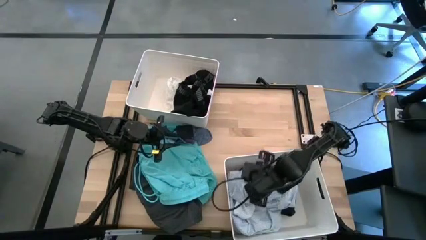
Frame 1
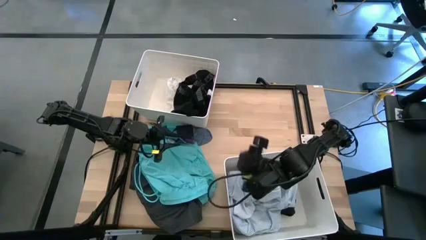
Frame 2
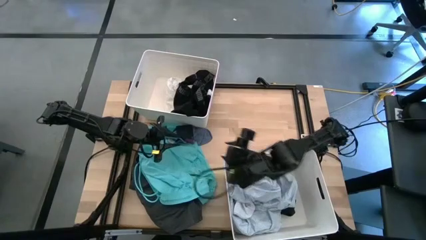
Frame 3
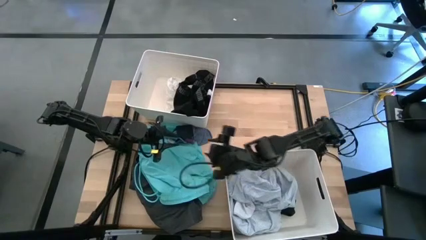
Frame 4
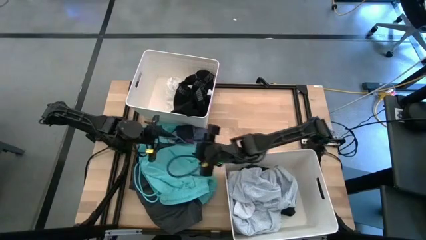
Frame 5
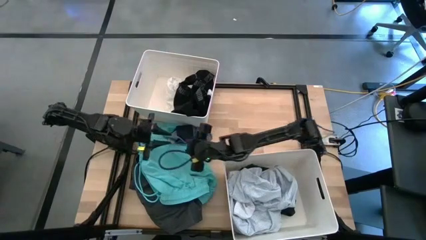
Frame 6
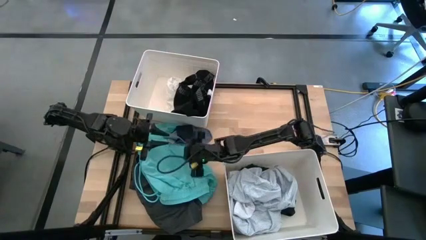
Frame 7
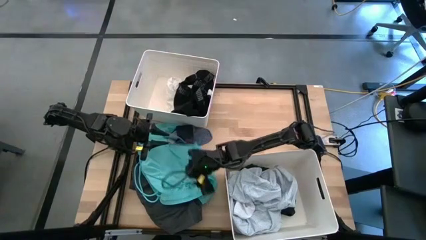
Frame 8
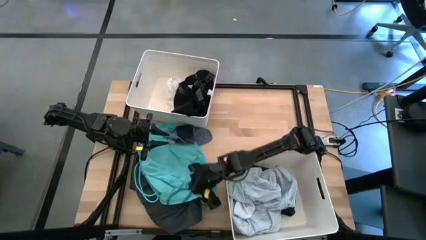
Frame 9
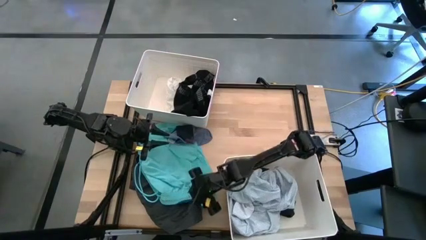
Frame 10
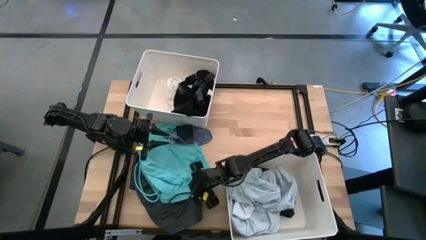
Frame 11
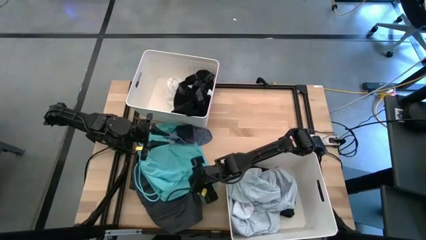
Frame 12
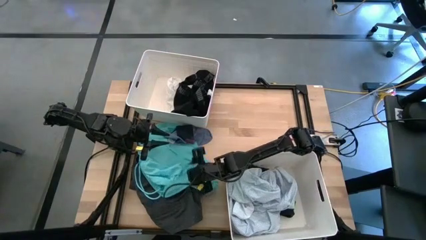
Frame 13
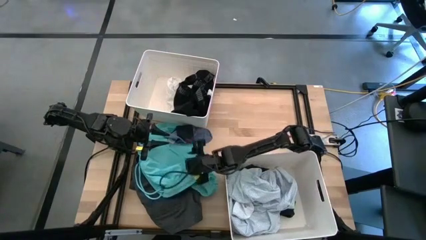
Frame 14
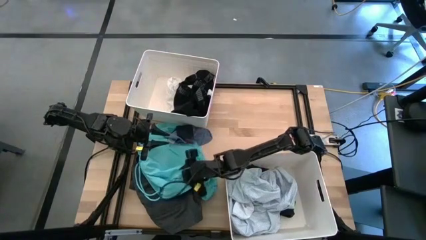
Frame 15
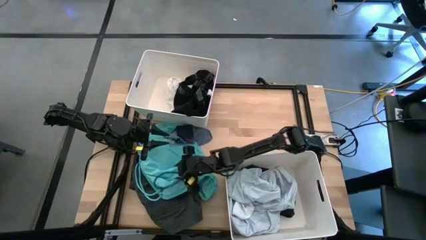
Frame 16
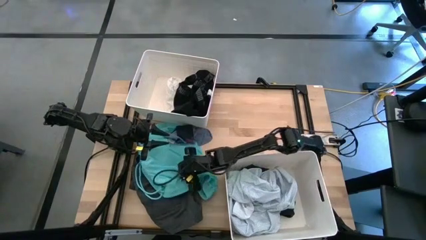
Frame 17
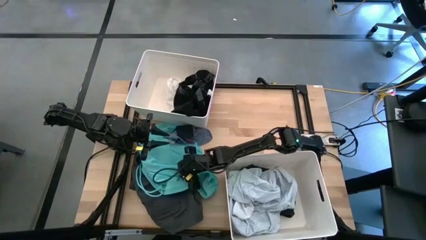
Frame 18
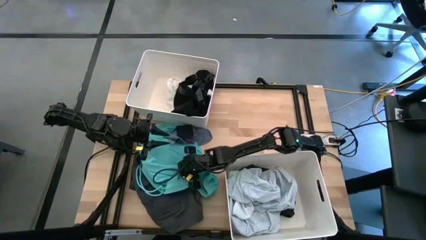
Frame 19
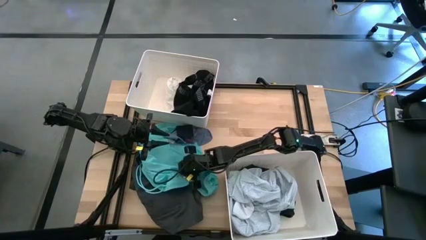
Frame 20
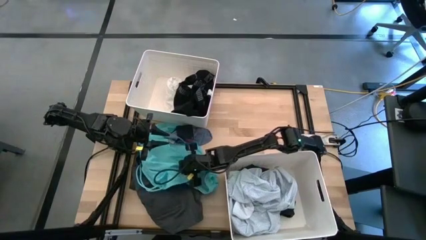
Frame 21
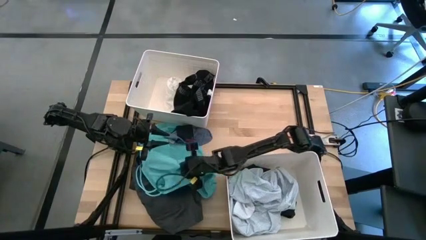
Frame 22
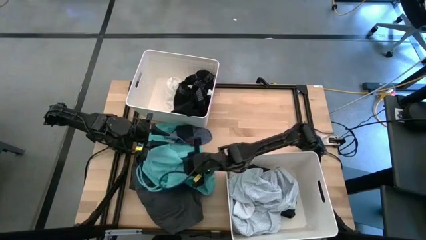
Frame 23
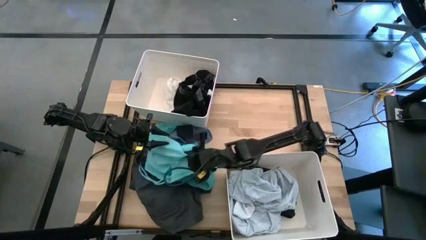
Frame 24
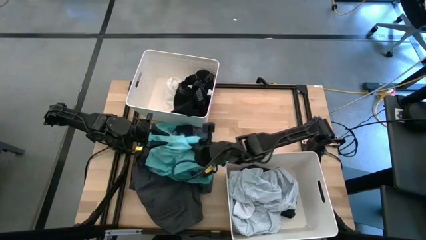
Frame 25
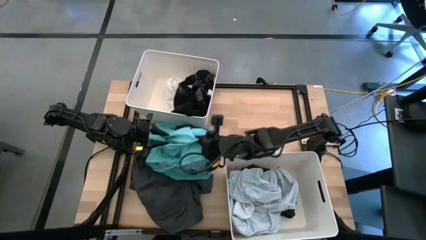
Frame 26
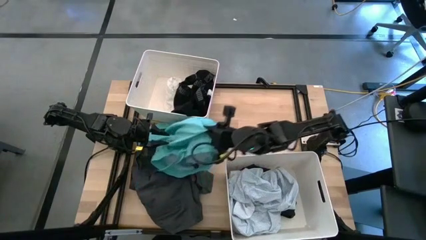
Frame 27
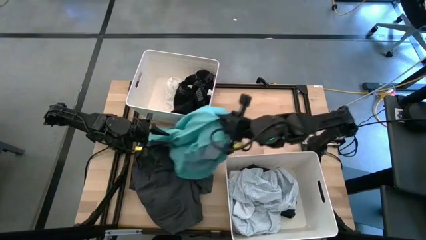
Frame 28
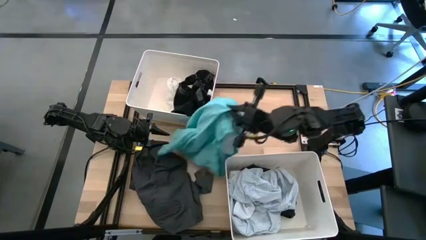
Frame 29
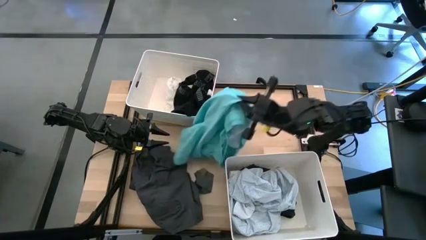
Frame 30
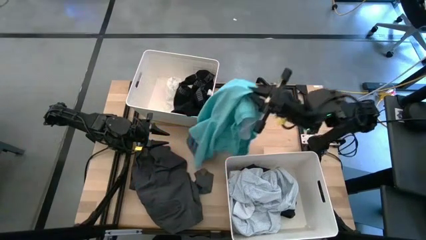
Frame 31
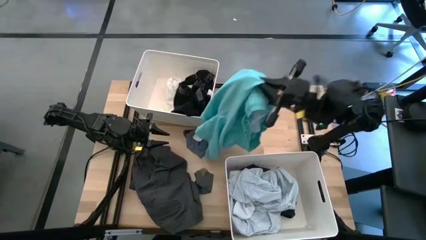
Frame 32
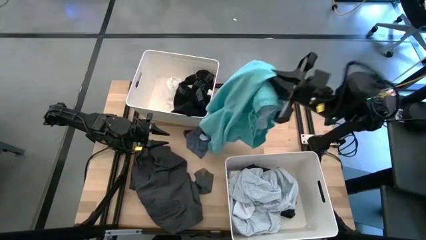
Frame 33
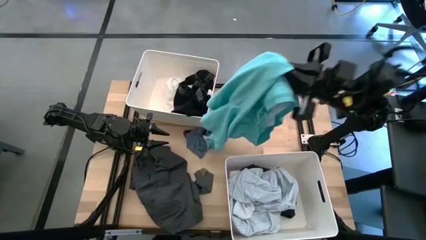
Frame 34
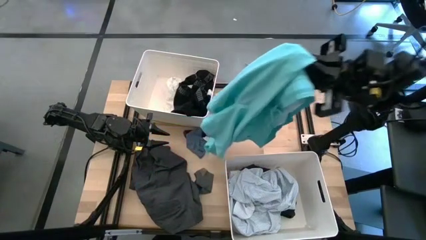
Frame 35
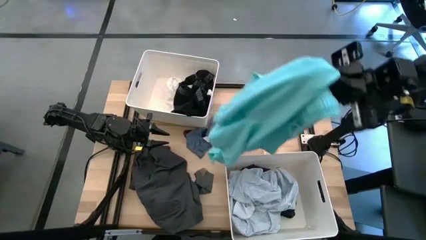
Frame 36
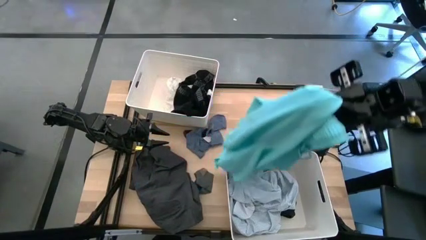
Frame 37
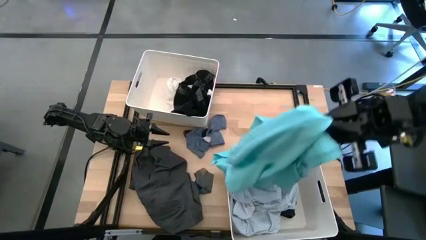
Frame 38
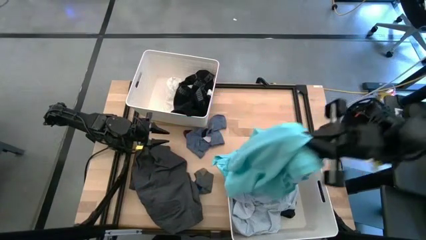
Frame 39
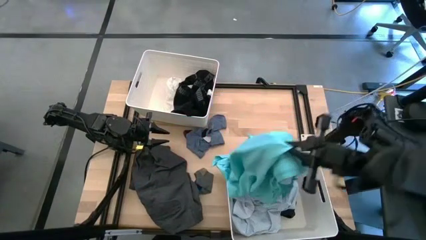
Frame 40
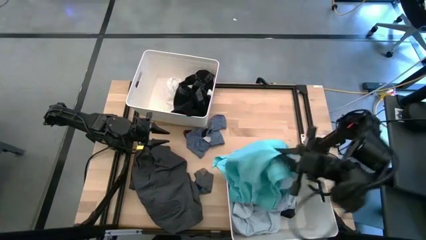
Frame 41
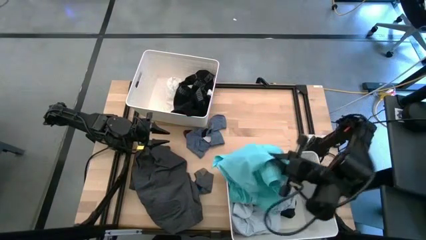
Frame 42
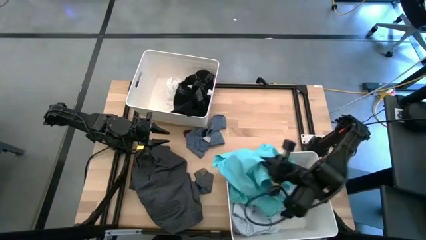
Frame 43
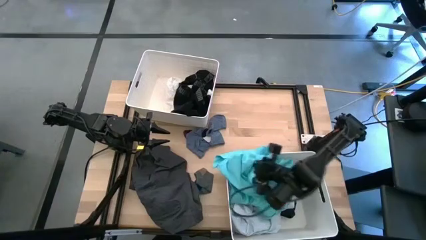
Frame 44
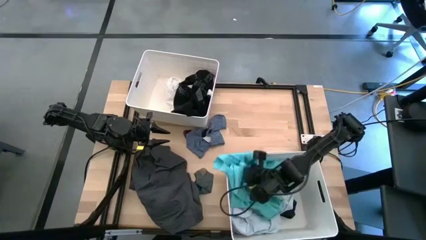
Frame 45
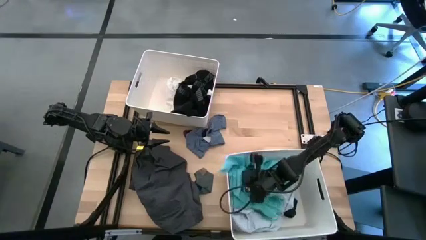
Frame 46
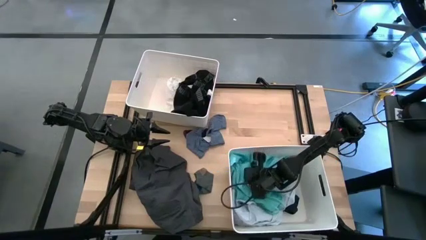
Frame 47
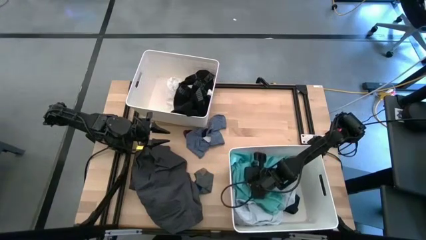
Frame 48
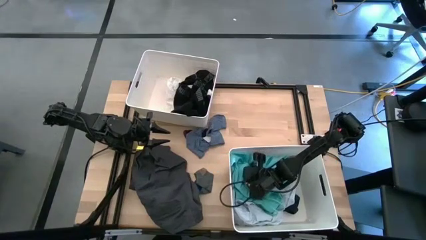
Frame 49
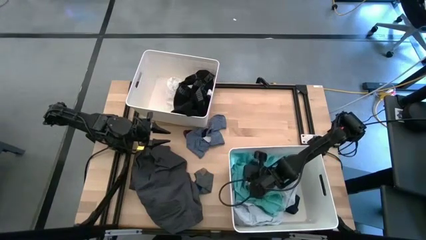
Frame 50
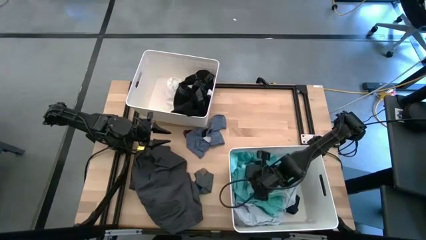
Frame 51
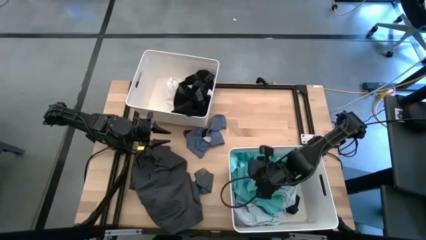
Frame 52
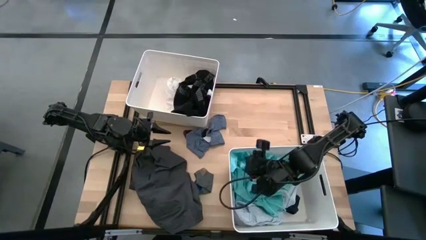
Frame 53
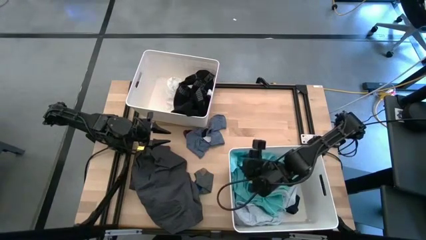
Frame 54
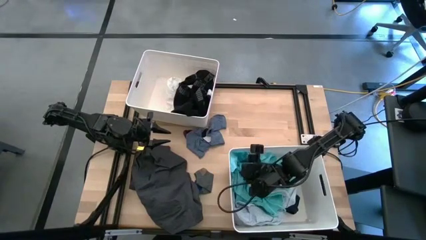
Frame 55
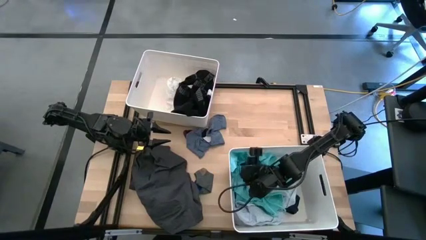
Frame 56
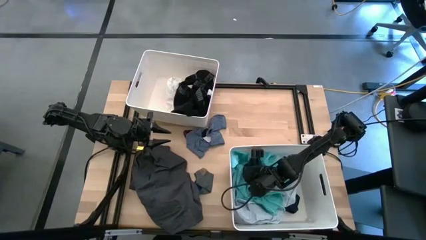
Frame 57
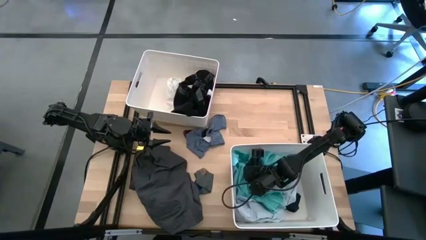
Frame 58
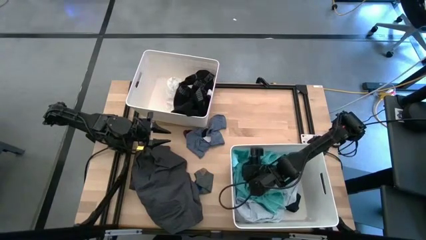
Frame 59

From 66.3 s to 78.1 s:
Task: Sort clothes
Put the light green shorts into the bottom white bin
